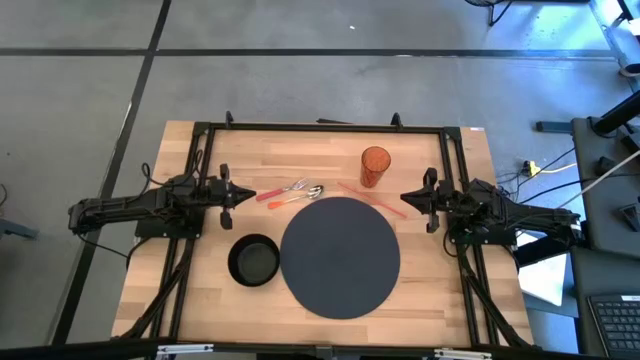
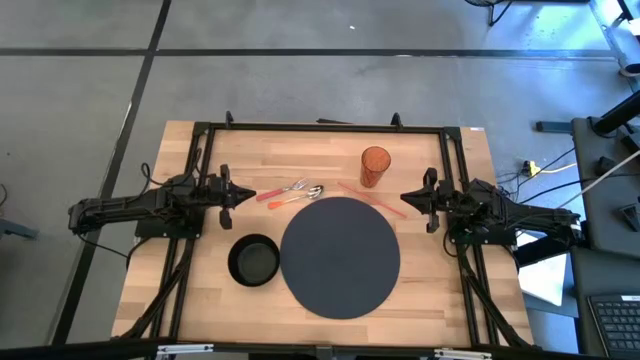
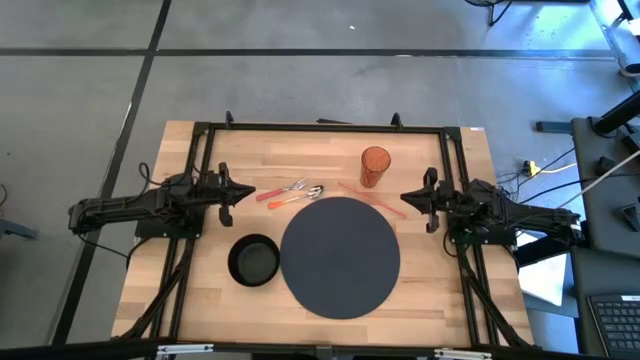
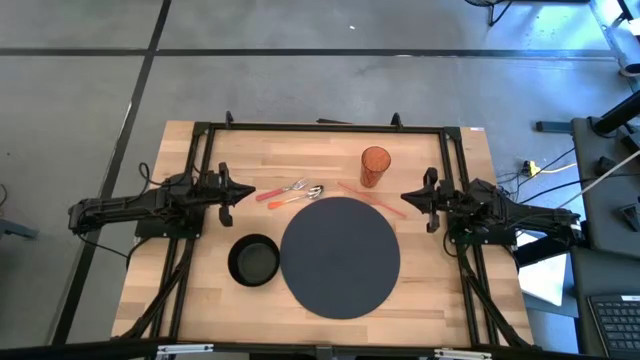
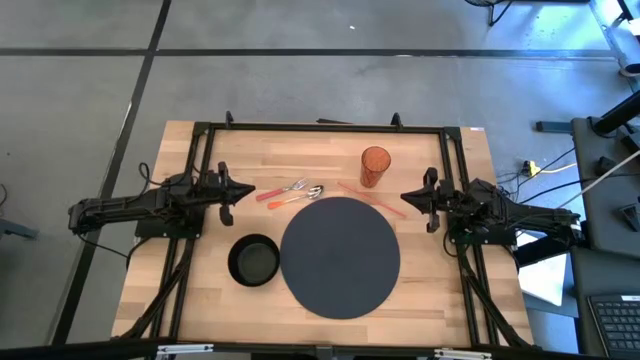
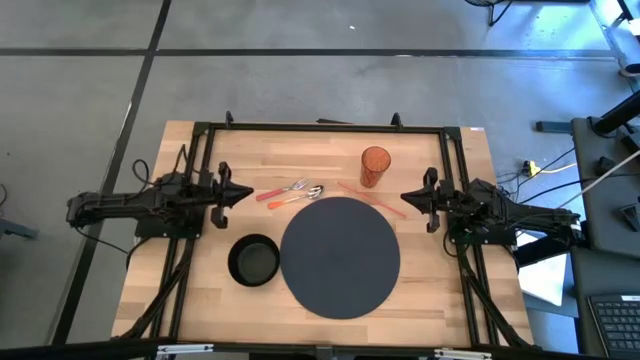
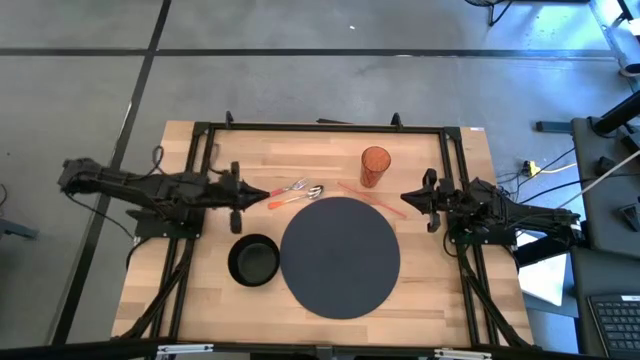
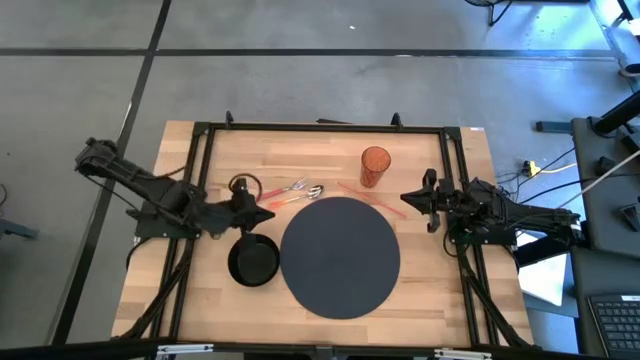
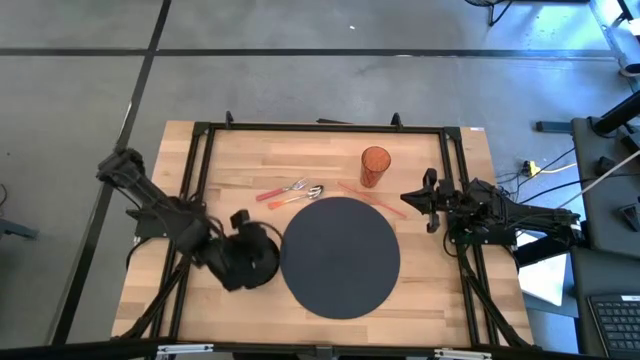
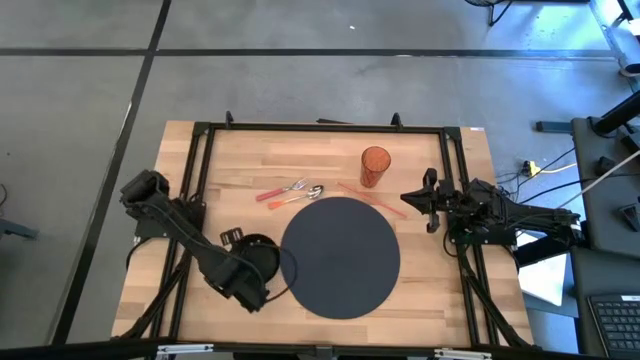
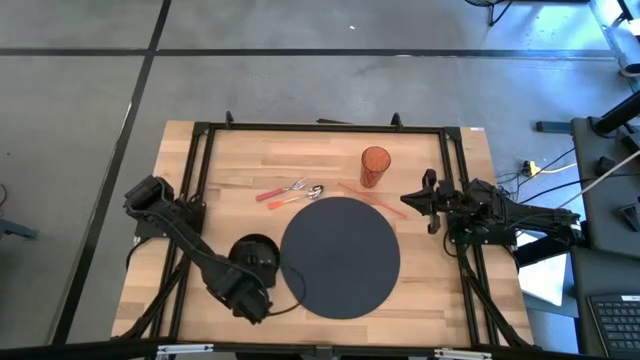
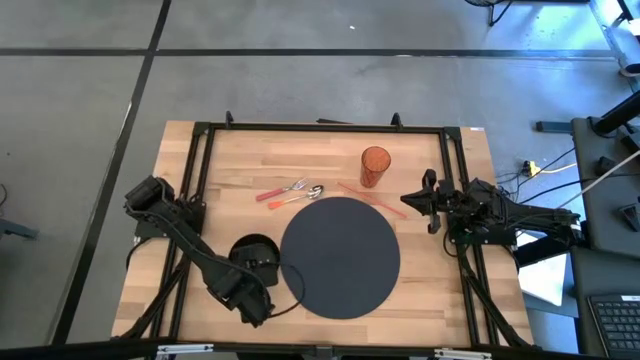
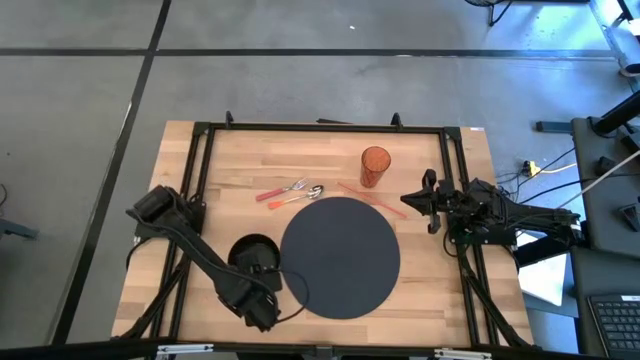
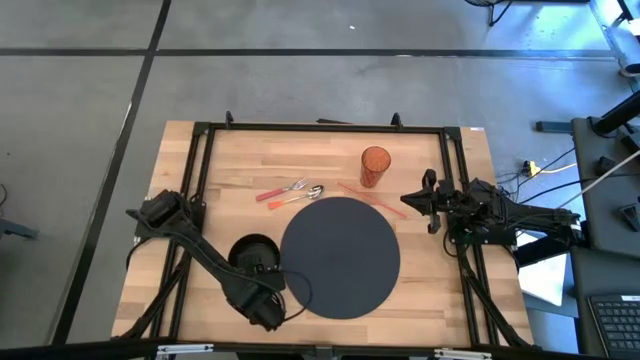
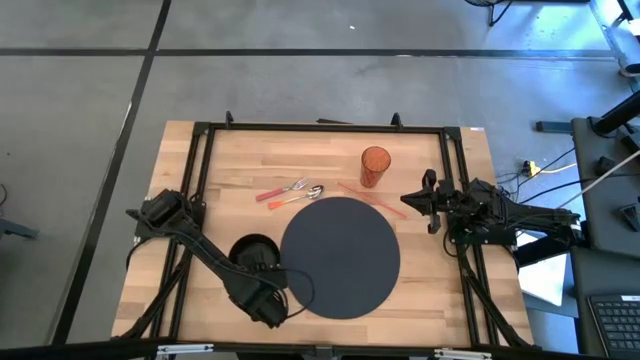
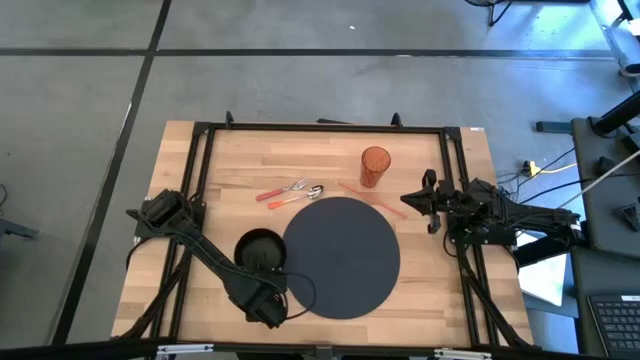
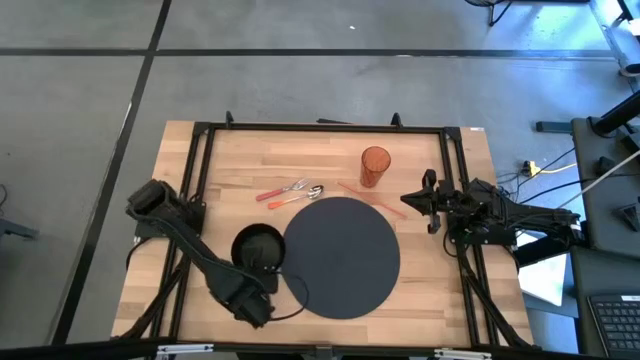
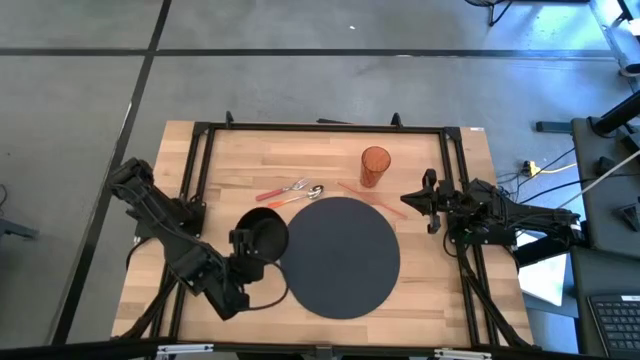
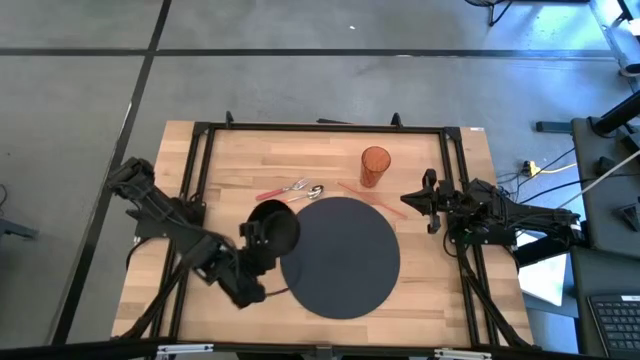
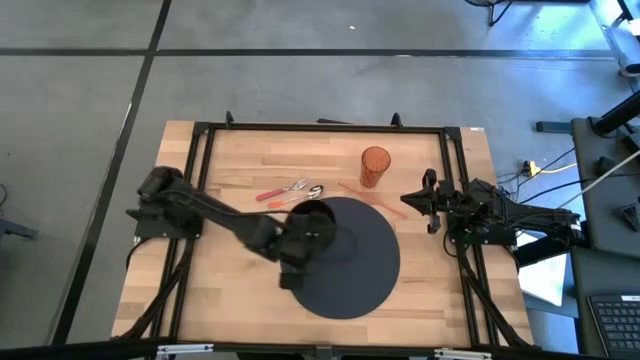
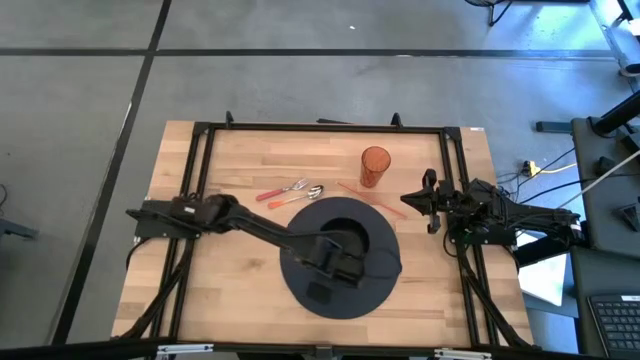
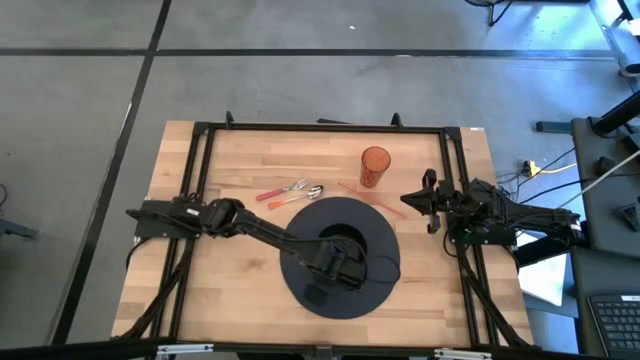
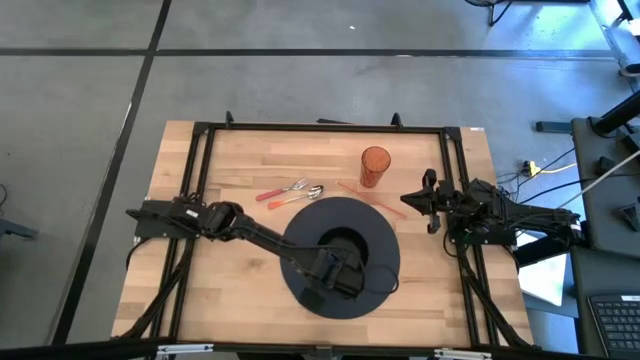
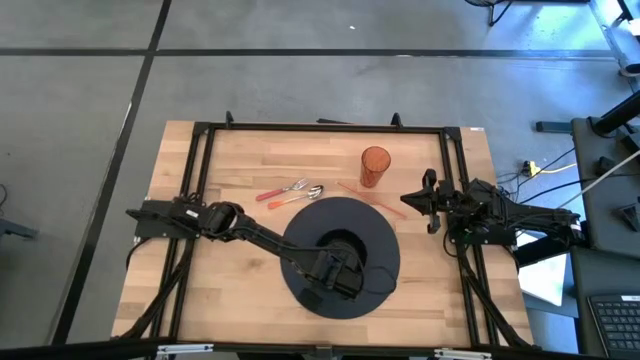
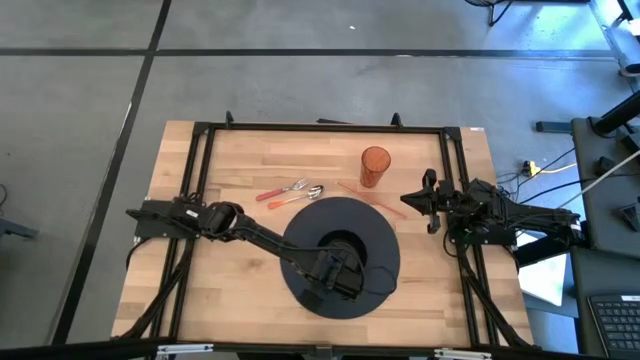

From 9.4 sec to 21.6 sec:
Task: Pick & Place Utensil
Put the black bowl on the black placemat

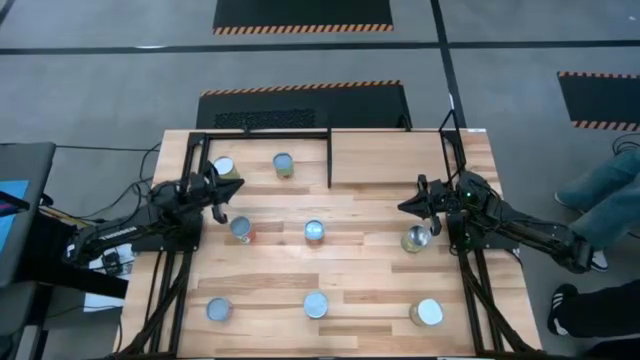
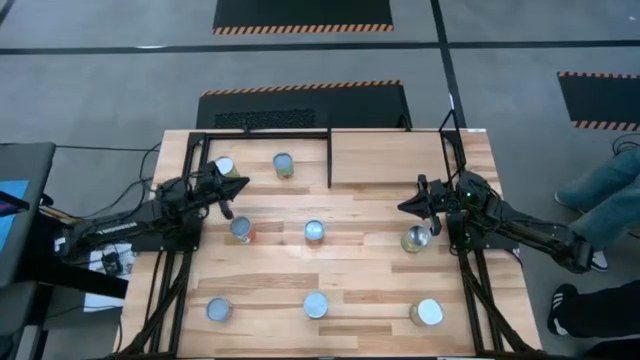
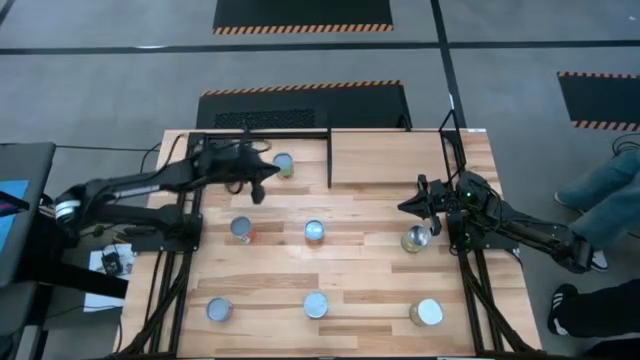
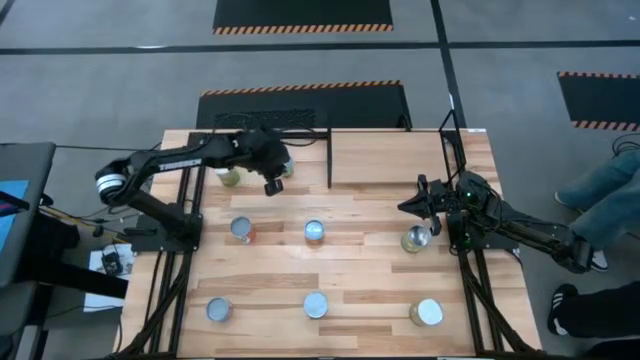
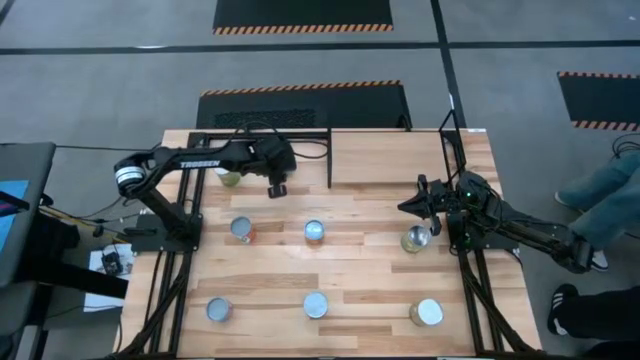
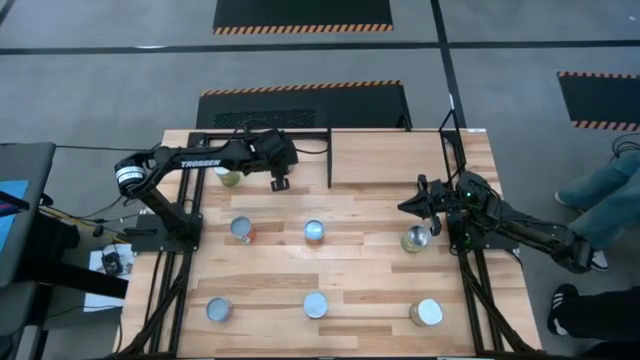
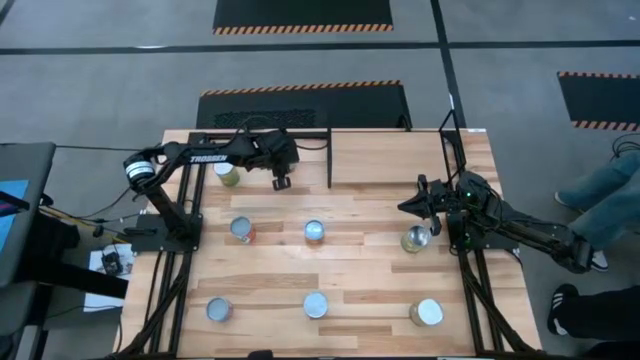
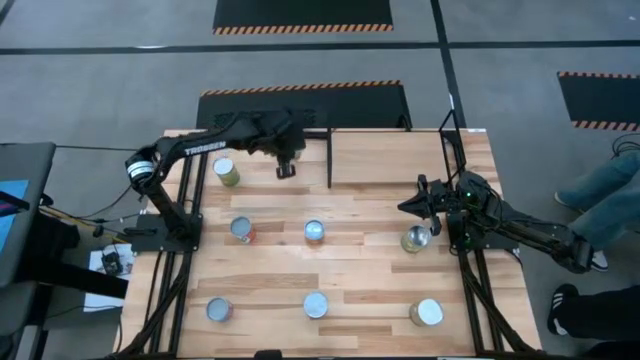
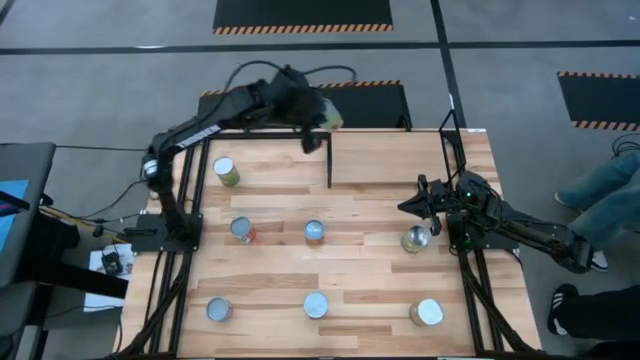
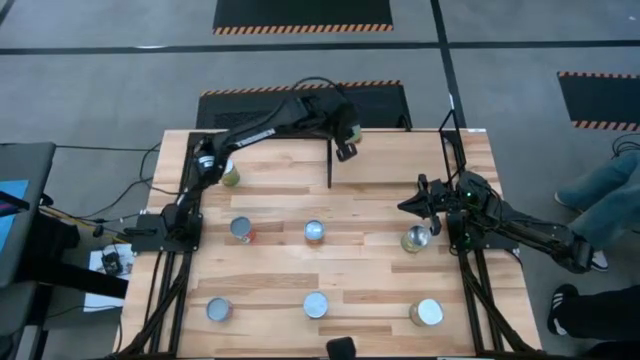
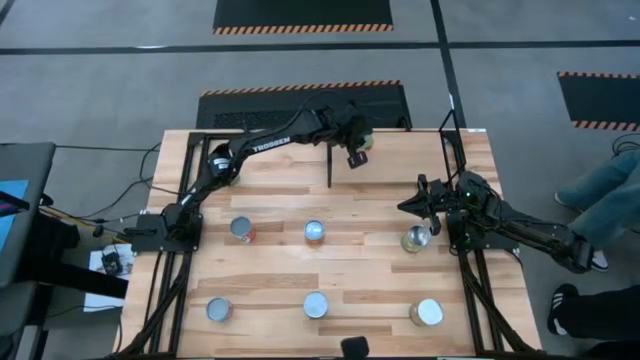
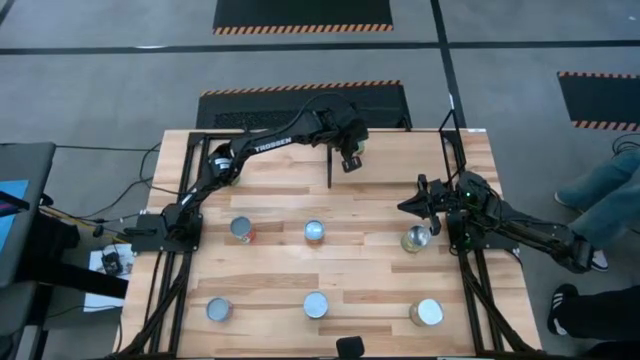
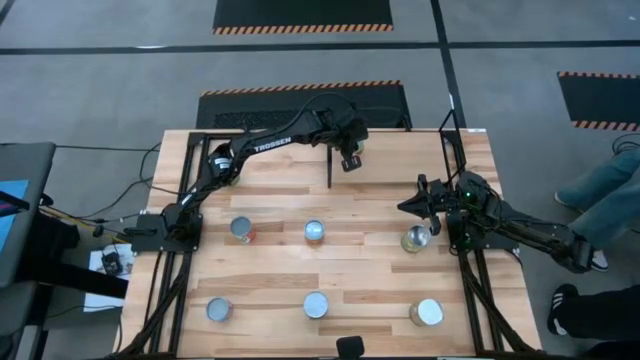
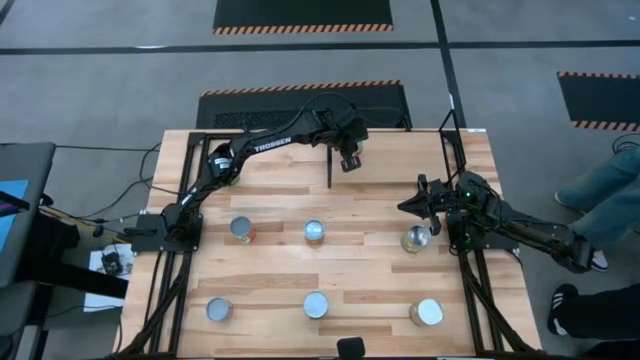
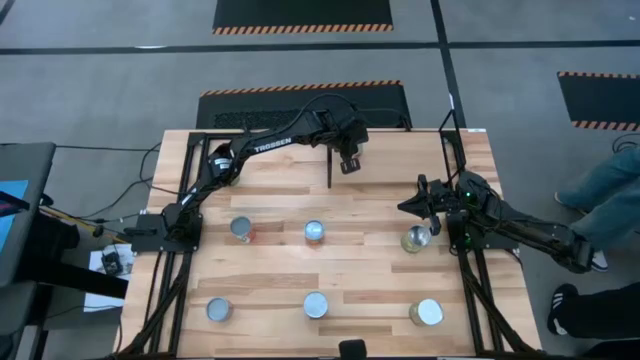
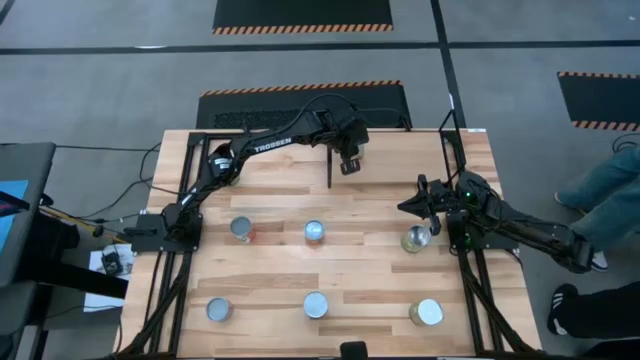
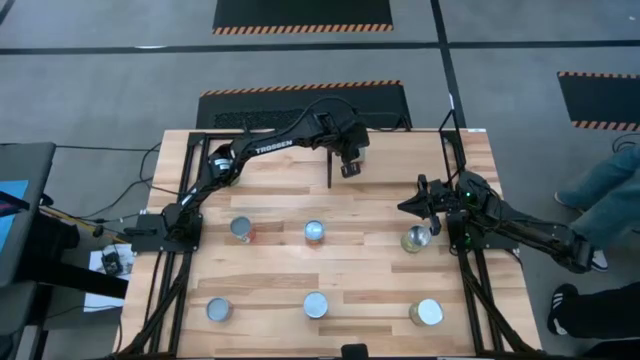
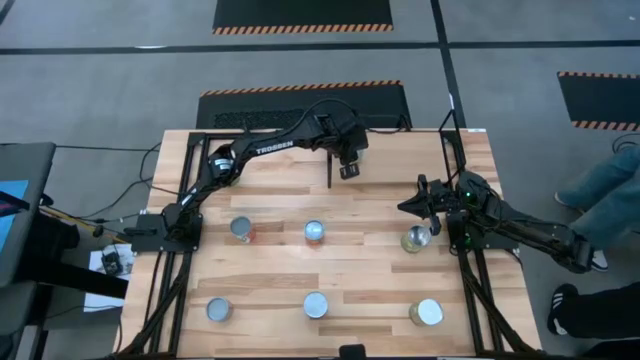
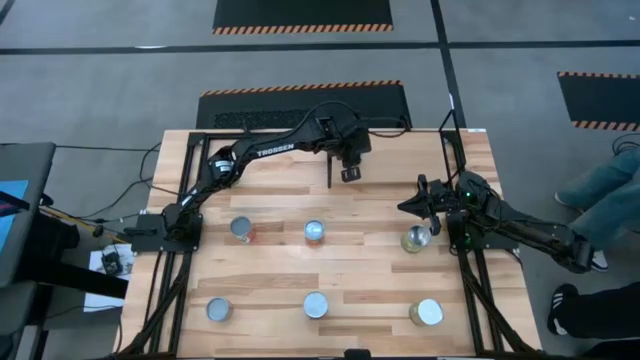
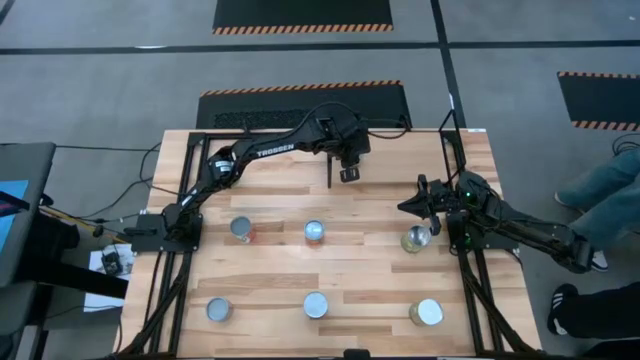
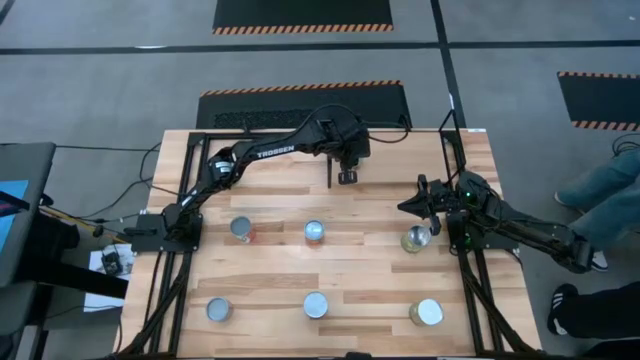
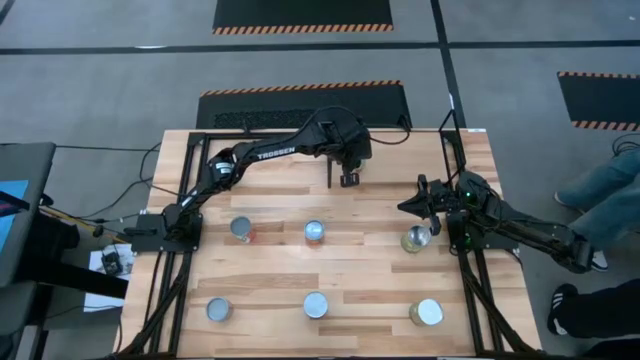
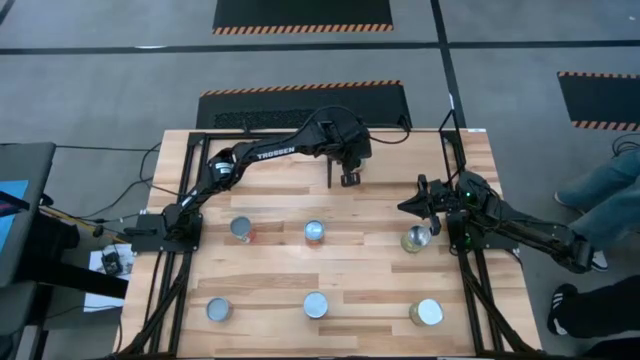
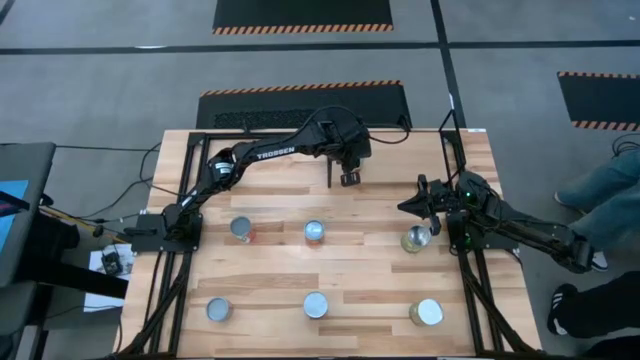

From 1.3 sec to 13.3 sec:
Task: Pick and place cans onto a shelf
Put the canned spaghetti sauce on the shelf
